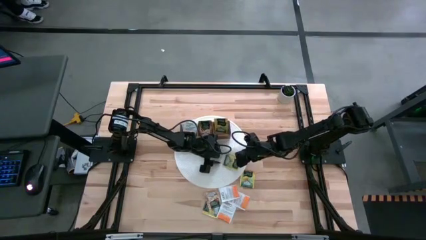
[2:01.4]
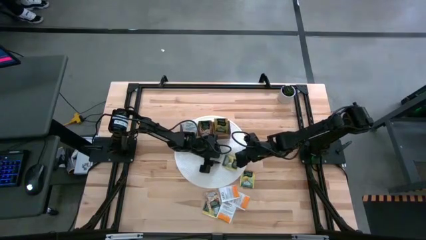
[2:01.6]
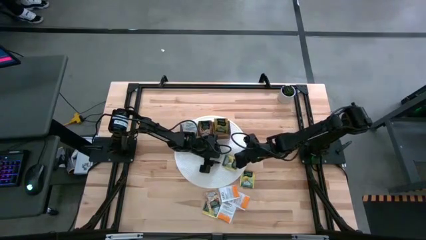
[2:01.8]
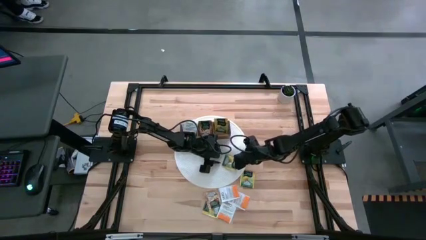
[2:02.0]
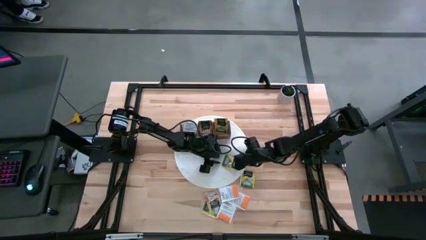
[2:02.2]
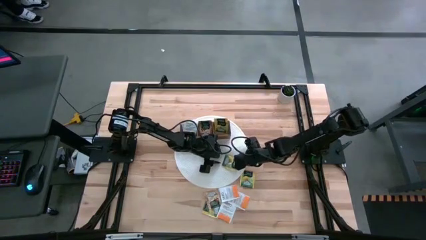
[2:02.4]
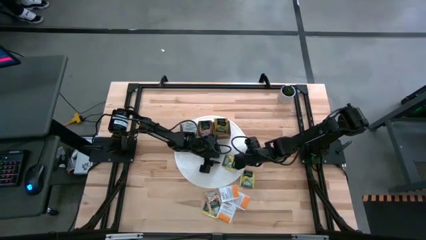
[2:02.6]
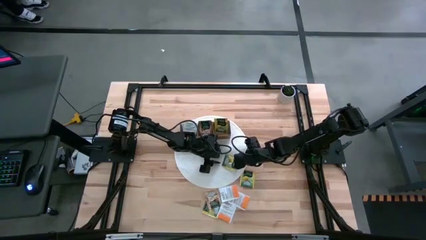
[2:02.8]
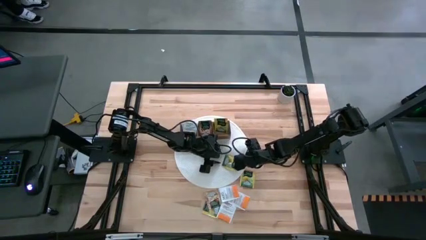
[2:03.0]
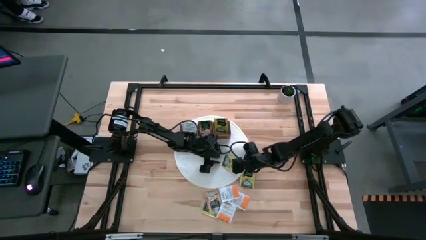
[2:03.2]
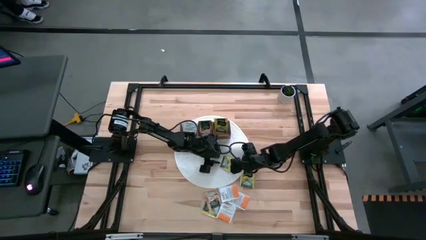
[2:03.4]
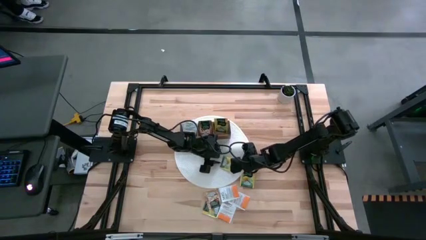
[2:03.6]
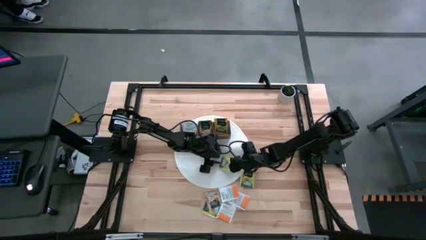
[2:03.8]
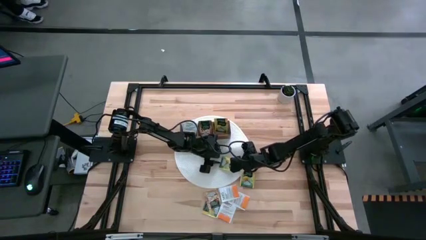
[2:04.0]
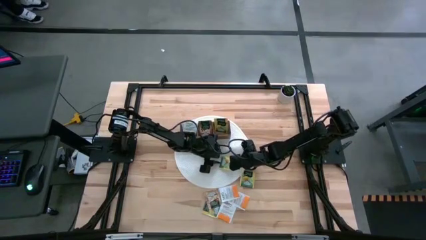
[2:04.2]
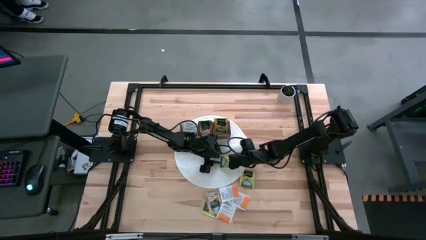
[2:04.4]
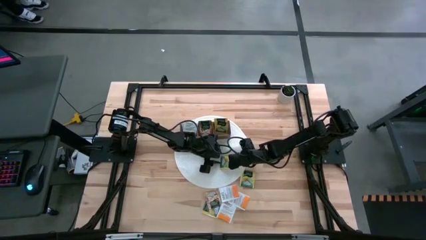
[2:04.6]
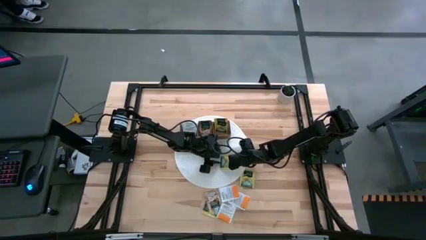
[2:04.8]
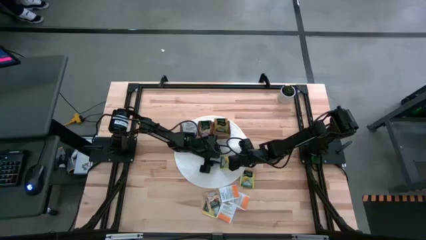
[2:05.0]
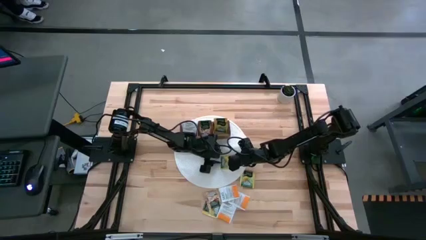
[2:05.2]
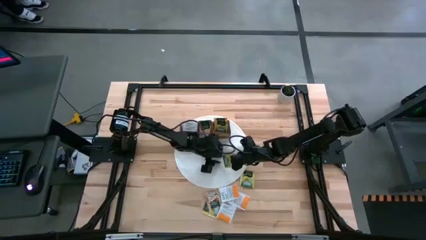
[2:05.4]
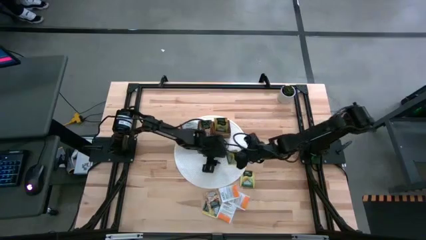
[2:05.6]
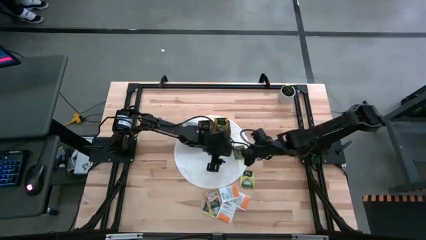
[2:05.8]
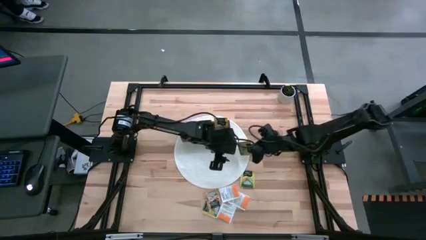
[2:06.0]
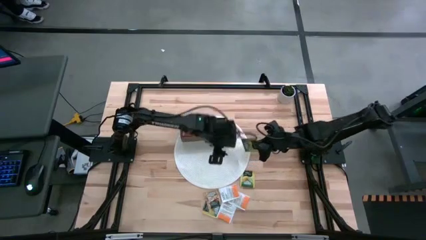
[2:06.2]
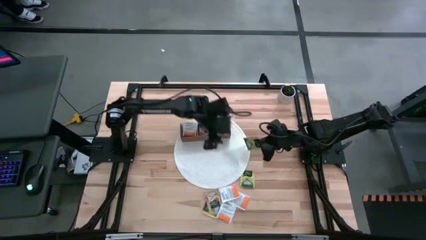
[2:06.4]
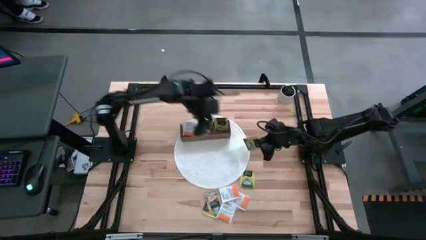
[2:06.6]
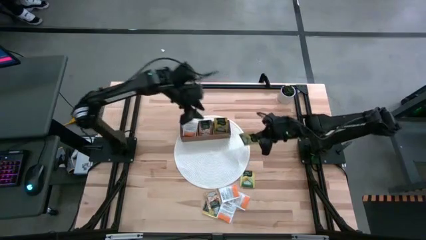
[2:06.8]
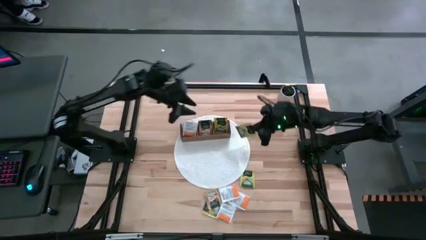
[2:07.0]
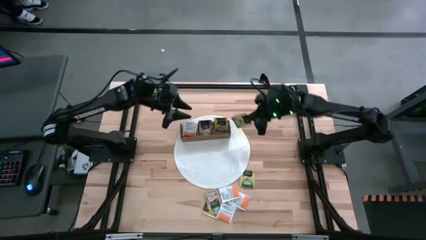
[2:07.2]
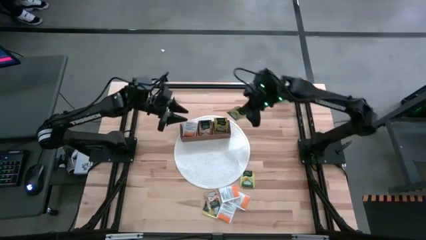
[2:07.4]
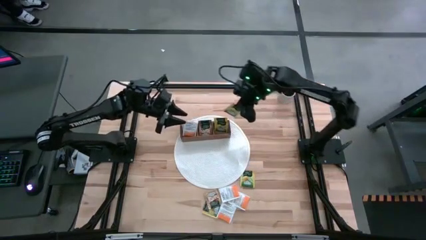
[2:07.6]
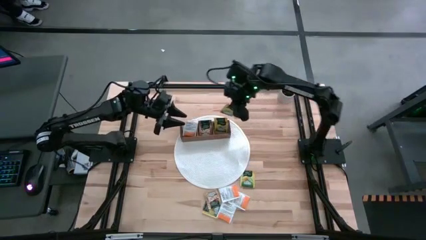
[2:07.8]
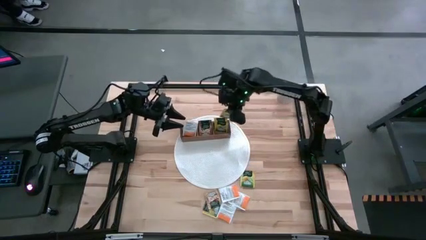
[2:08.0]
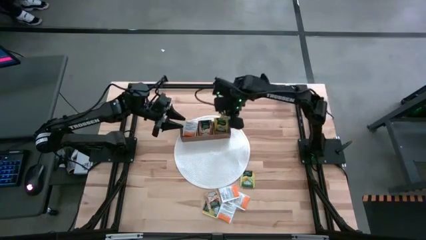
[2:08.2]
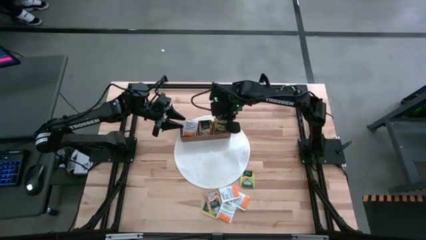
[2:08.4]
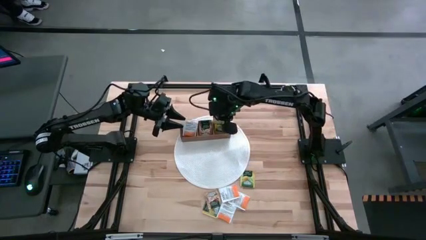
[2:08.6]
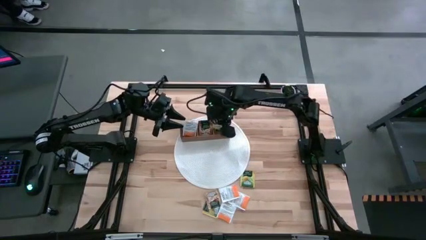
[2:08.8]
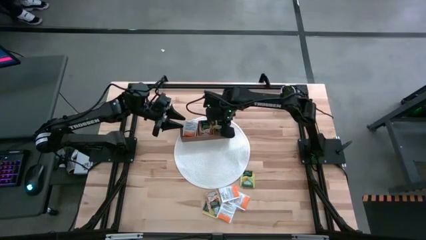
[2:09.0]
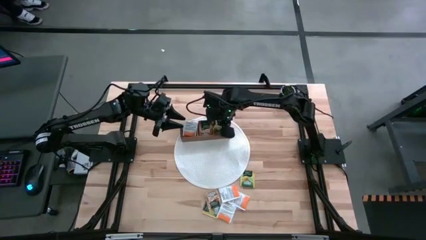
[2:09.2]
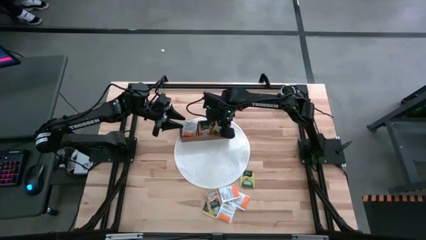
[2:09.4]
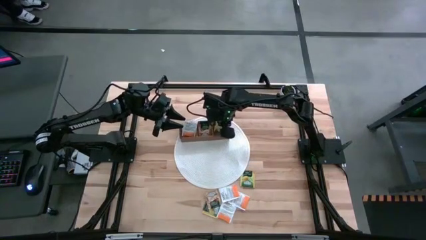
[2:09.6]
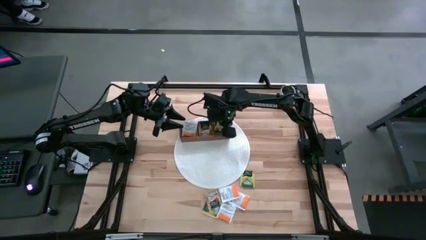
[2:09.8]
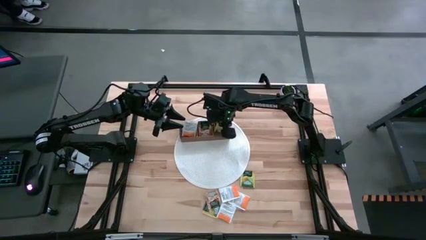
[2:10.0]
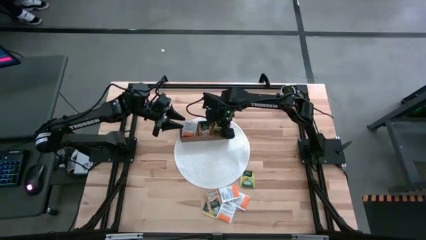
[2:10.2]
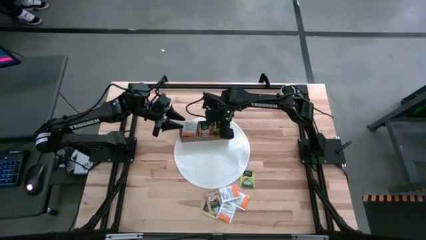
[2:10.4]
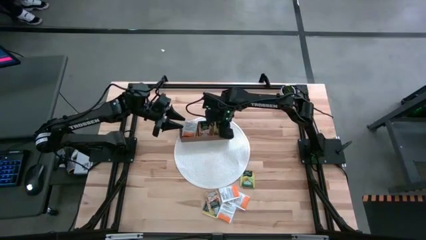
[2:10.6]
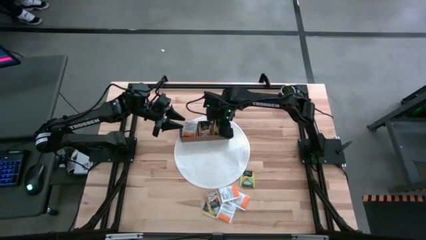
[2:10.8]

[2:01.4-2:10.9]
Task: Pick & Place Tea
Put the yellow tea bag into the right section of the wooden organizer

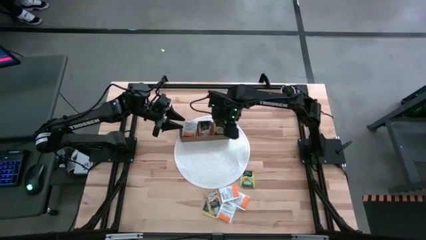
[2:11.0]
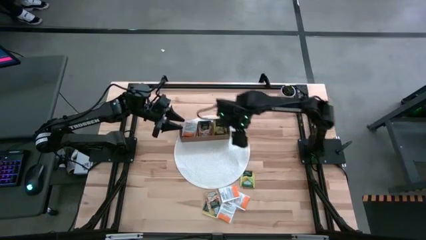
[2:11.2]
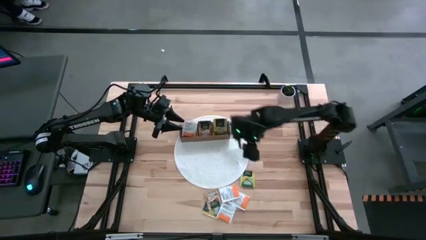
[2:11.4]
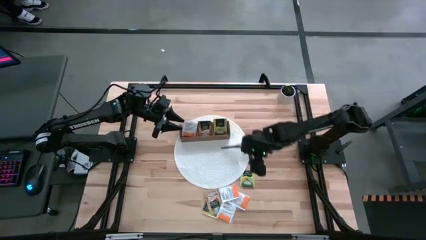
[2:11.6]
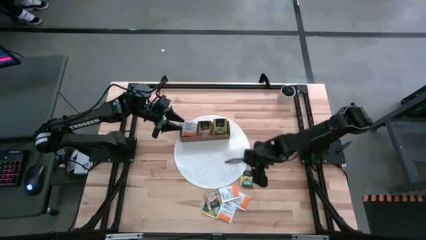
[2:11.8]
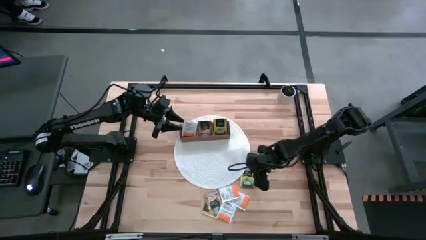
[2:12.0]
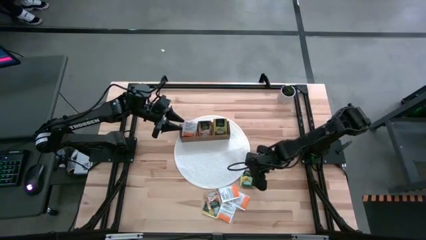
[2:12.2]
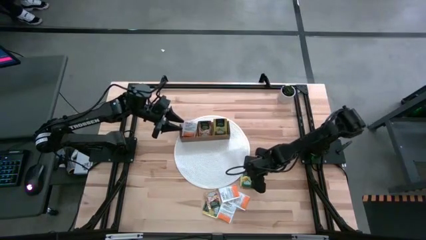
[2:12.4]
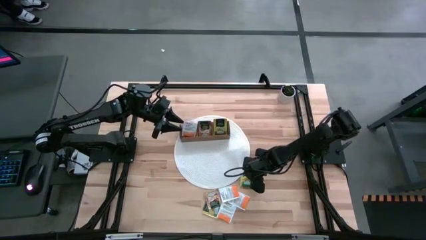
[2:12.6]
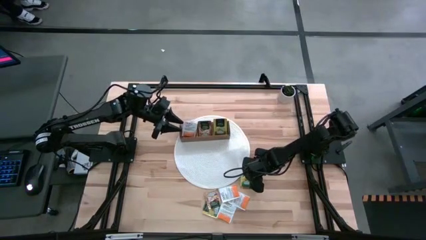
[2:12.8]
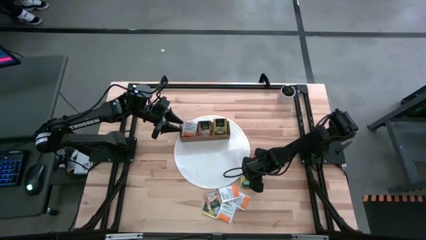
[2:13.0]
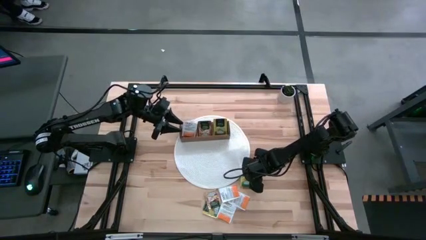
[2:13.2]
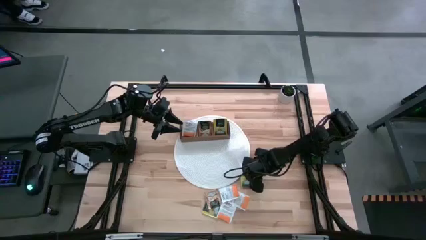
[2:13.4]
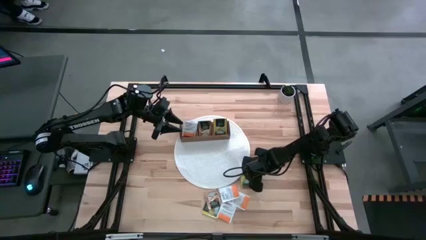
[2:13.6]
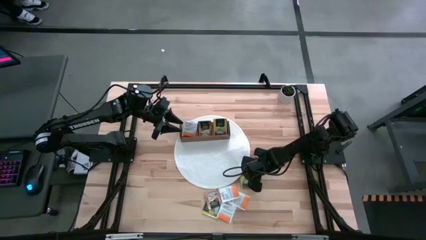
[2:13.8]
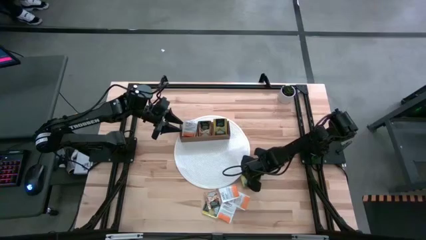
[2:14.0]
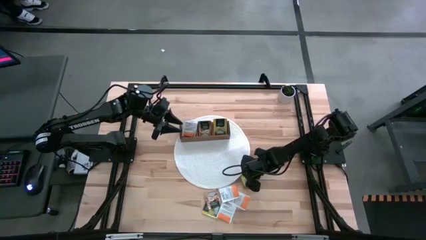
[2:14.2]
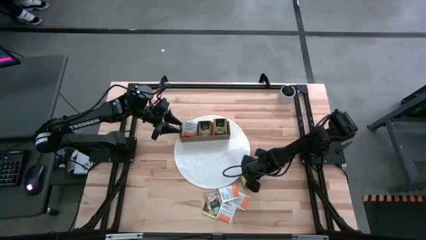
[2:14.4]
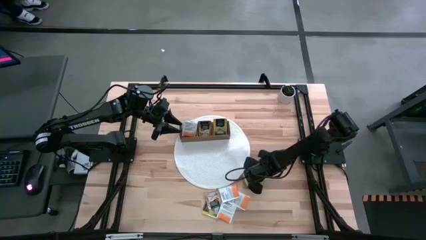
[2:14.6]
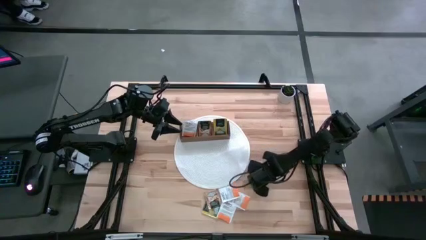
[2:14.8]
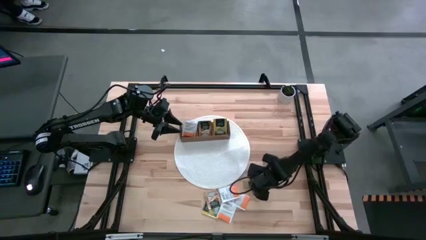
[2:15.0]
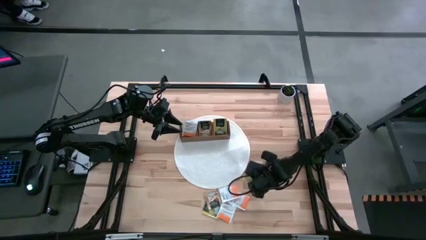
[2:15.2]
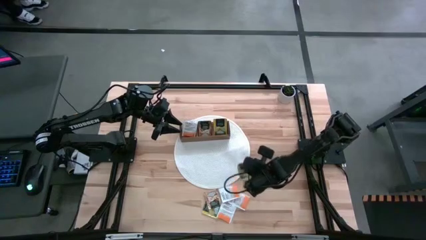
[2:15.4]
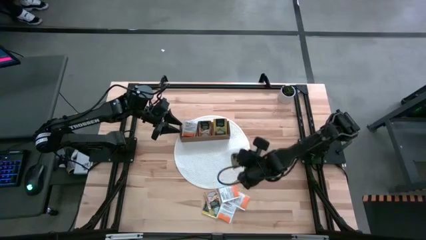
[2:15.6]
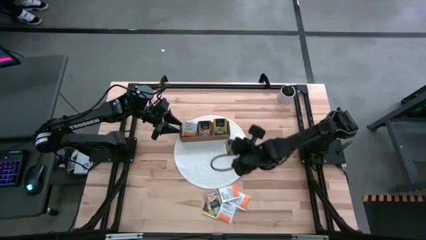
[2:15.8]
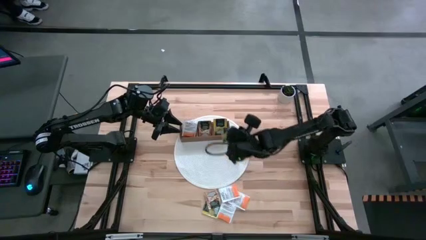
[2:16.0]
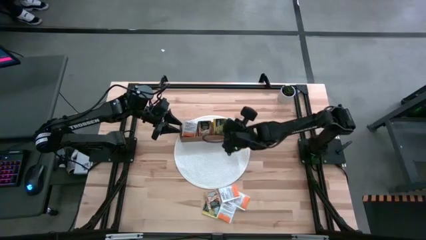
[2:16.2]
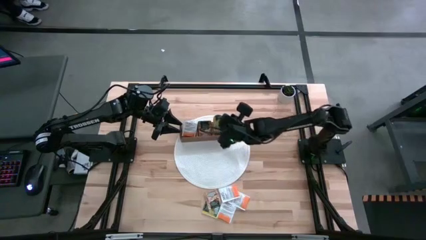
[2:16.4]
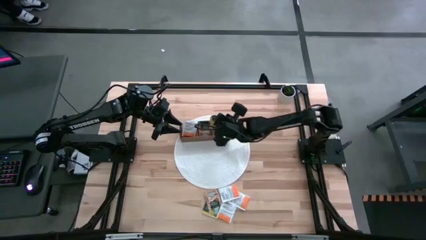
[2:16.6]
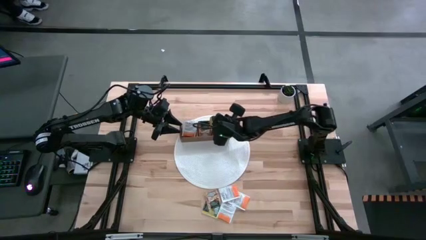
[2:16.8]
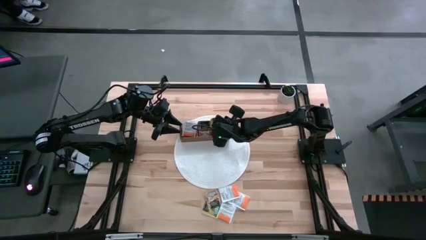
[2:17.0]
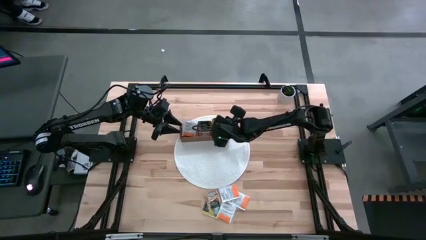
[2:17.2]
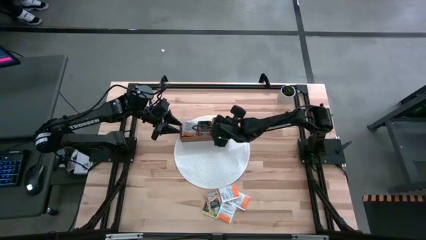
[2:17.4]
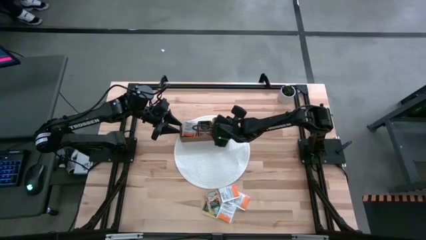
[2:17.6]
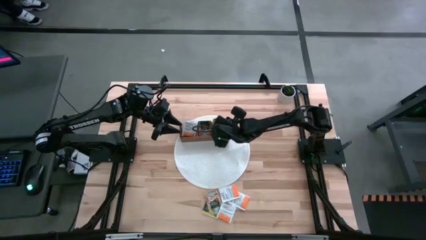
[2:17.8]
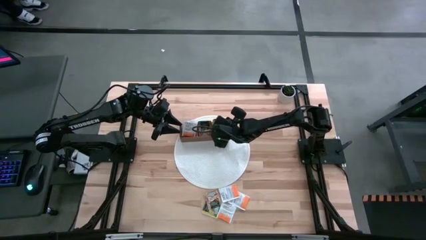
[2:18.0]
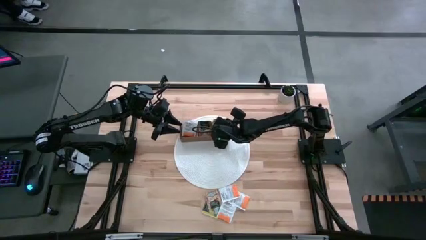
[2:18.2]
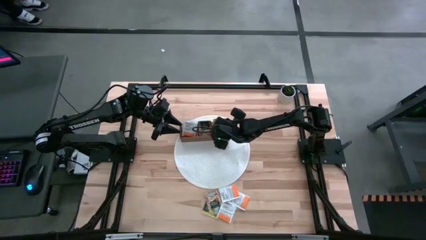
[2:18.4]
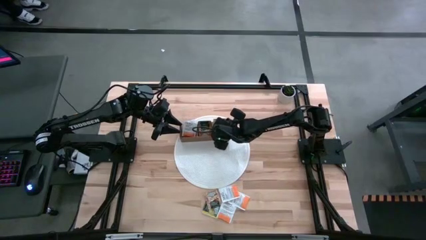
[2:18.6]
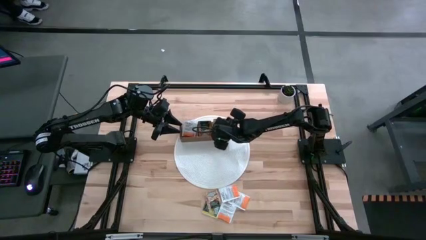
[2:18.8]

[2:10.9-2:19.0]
Put the yellow tea bag into the right section of the wooden organizer
